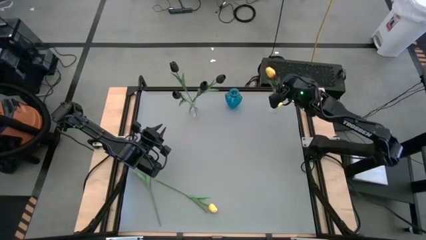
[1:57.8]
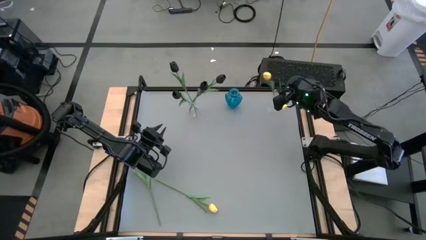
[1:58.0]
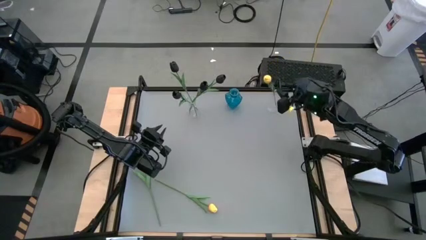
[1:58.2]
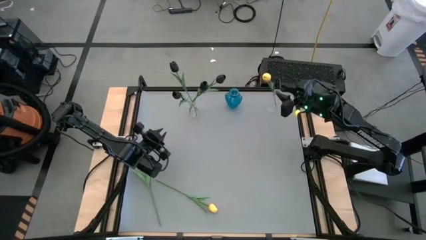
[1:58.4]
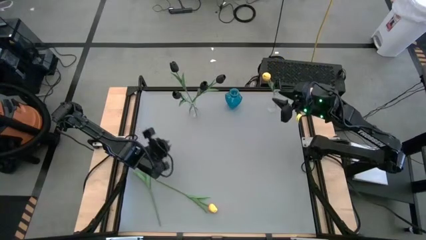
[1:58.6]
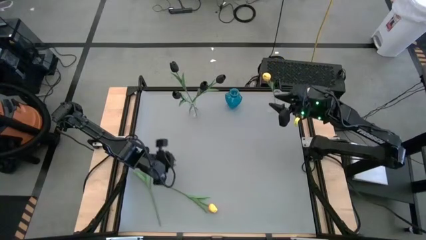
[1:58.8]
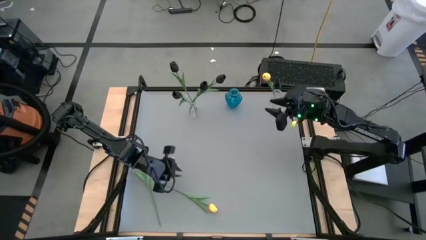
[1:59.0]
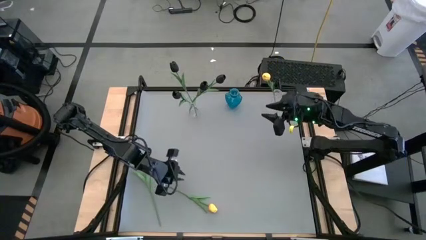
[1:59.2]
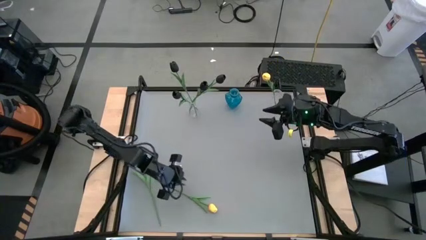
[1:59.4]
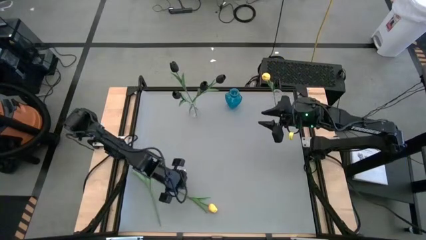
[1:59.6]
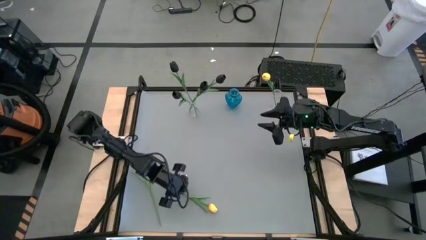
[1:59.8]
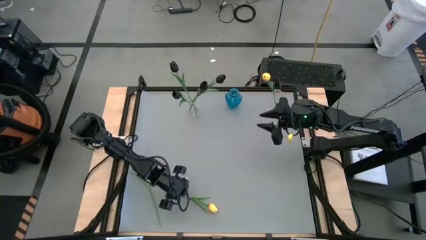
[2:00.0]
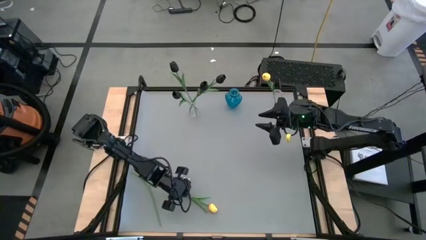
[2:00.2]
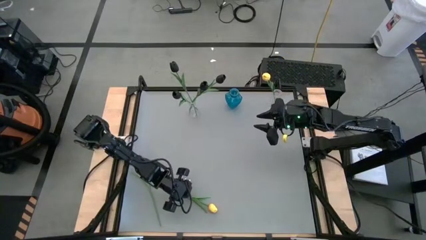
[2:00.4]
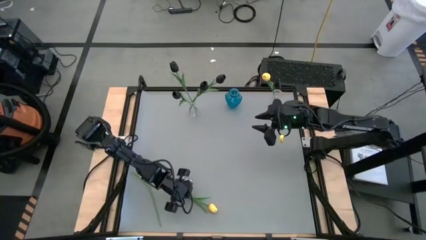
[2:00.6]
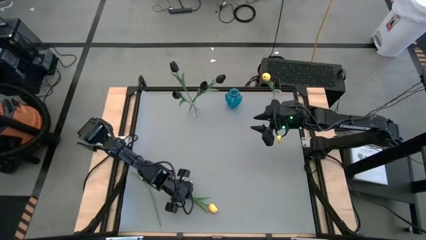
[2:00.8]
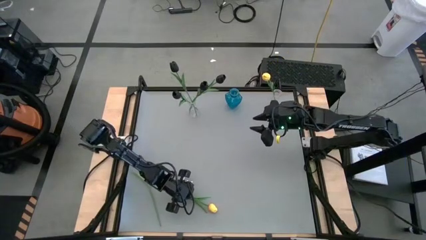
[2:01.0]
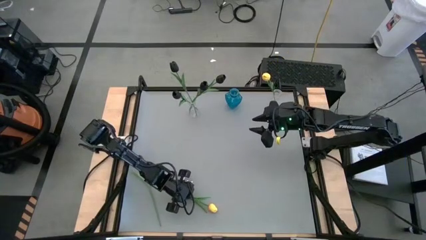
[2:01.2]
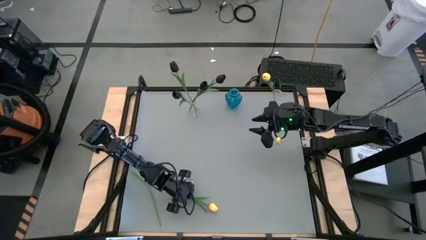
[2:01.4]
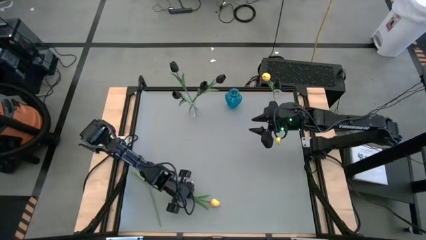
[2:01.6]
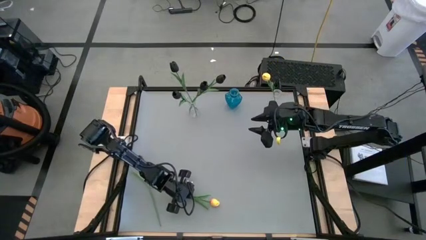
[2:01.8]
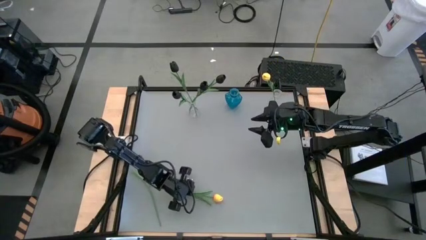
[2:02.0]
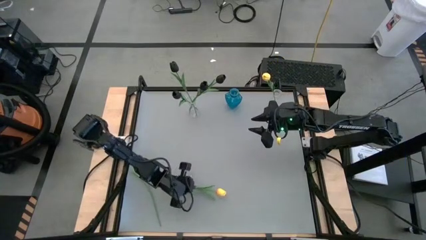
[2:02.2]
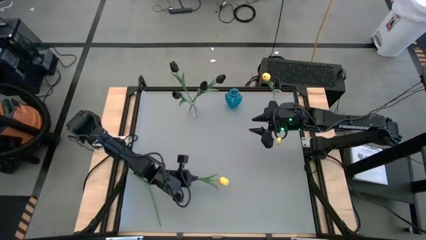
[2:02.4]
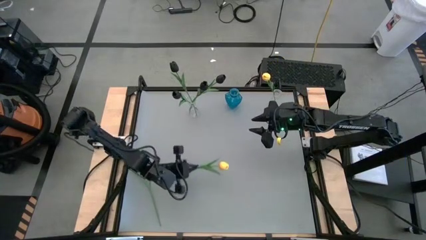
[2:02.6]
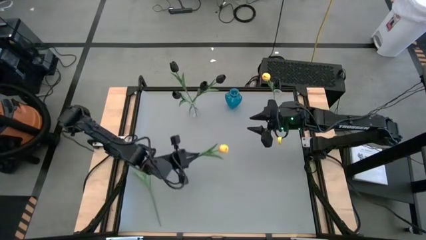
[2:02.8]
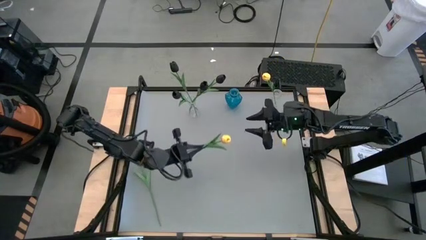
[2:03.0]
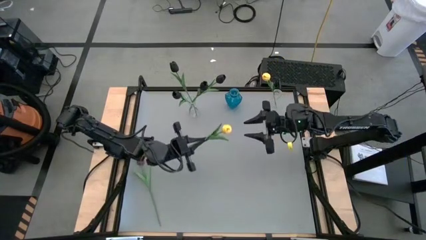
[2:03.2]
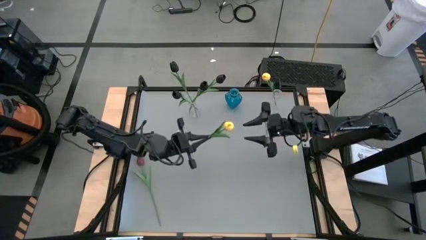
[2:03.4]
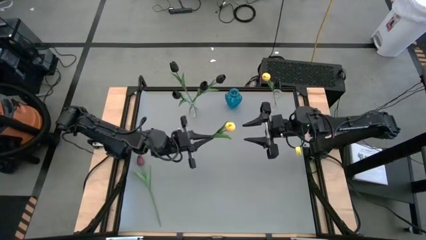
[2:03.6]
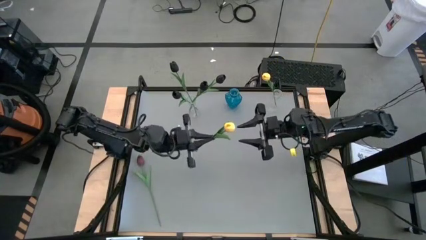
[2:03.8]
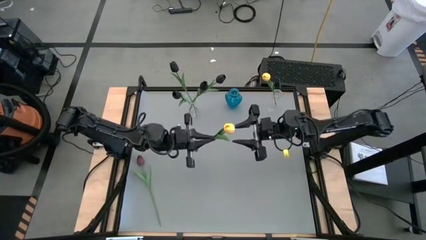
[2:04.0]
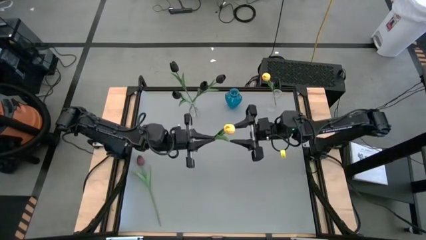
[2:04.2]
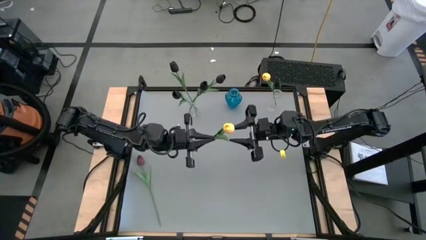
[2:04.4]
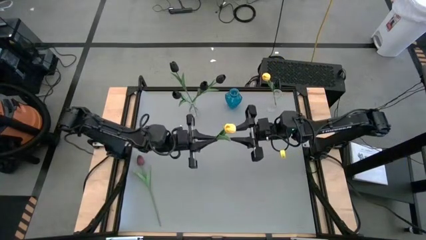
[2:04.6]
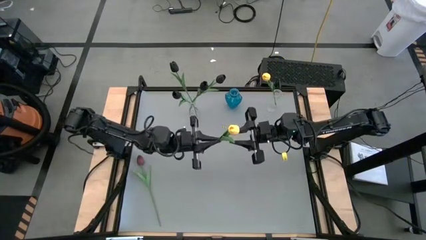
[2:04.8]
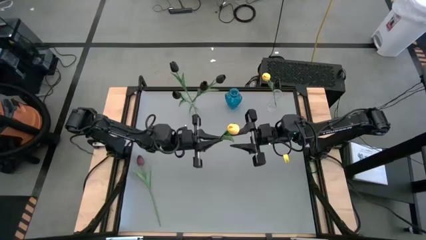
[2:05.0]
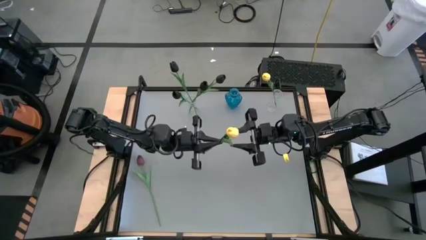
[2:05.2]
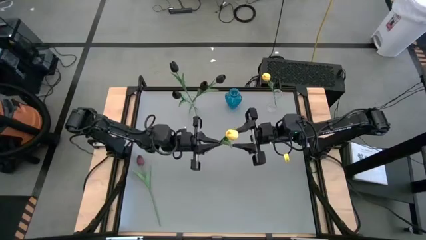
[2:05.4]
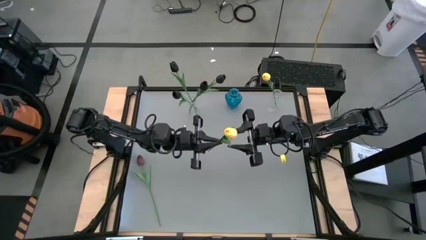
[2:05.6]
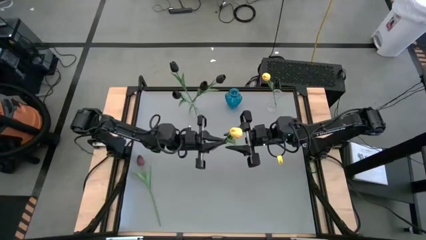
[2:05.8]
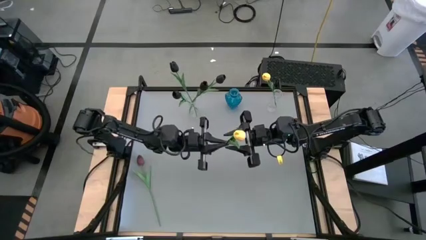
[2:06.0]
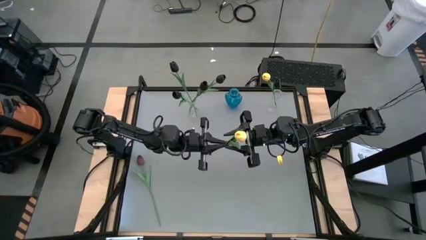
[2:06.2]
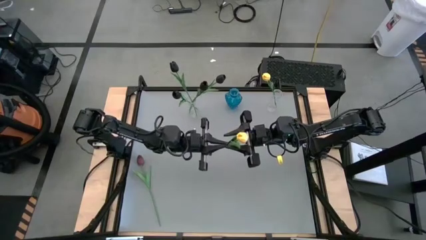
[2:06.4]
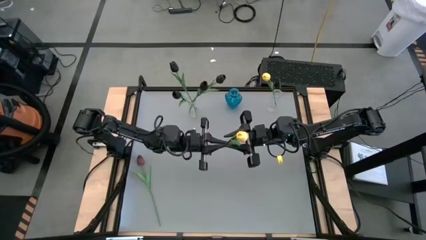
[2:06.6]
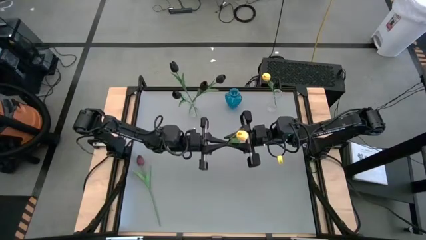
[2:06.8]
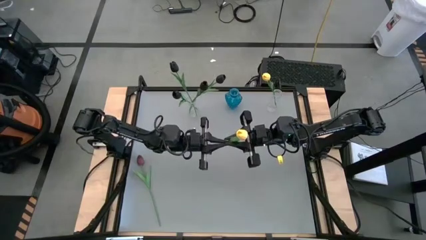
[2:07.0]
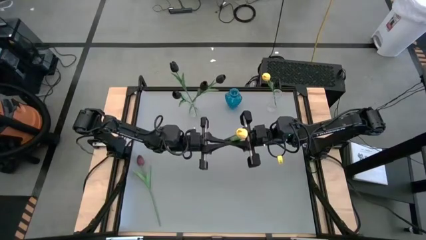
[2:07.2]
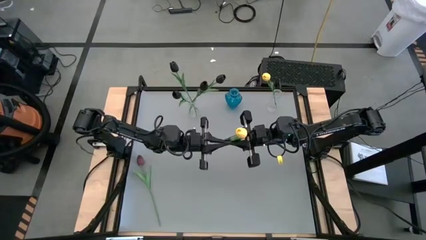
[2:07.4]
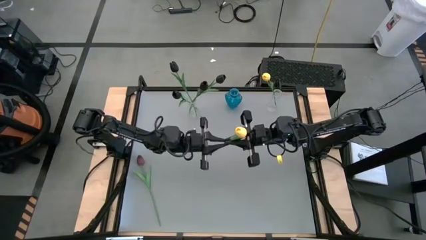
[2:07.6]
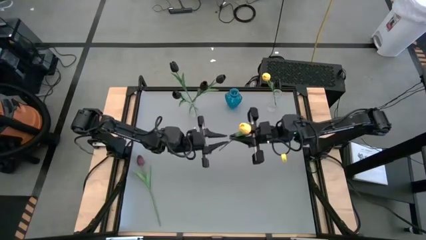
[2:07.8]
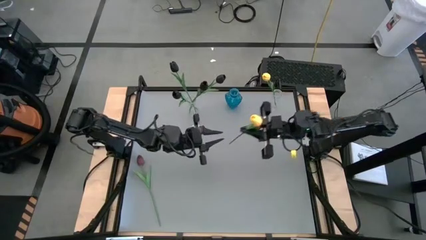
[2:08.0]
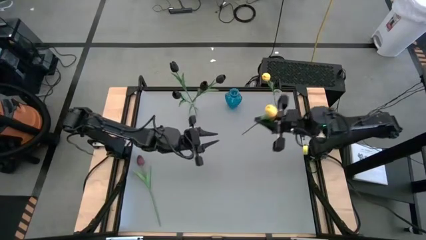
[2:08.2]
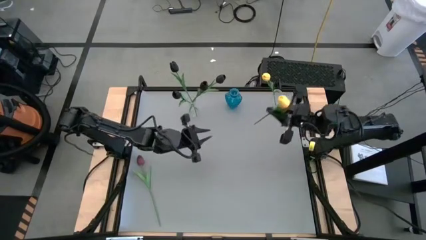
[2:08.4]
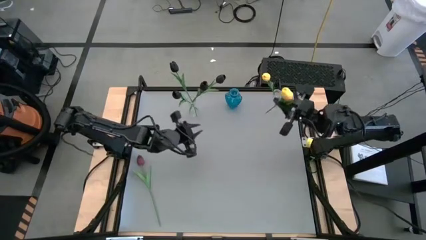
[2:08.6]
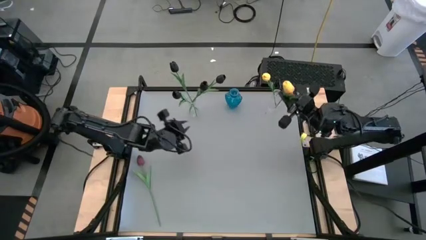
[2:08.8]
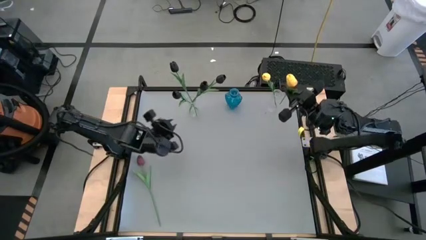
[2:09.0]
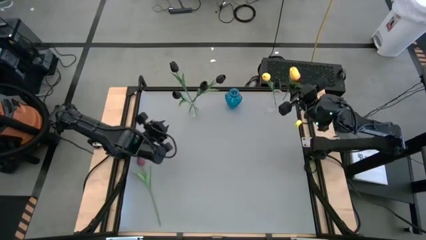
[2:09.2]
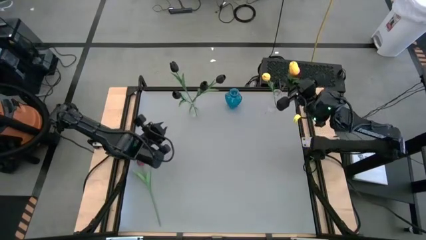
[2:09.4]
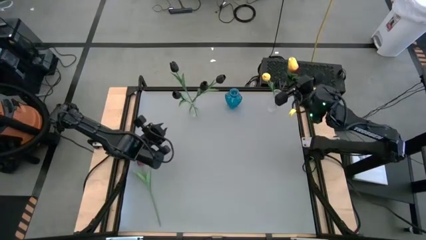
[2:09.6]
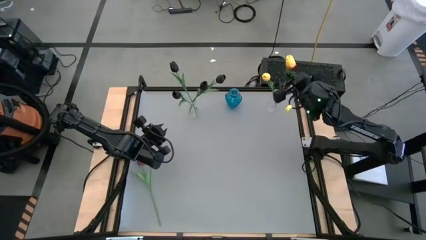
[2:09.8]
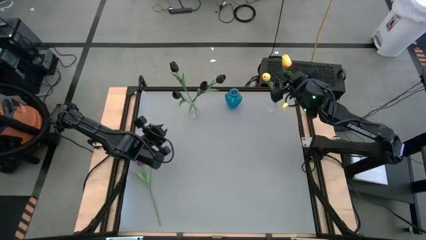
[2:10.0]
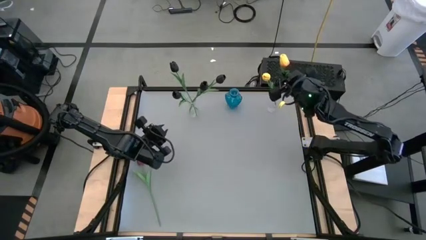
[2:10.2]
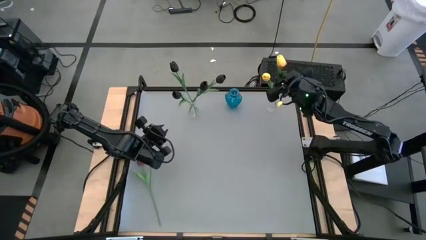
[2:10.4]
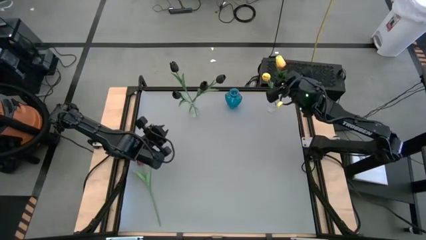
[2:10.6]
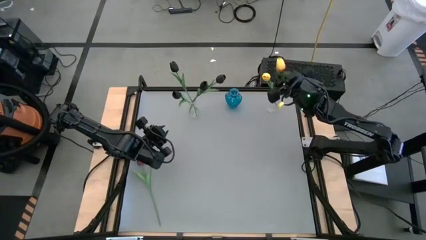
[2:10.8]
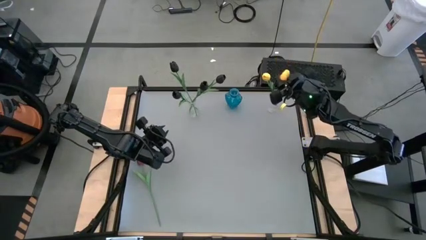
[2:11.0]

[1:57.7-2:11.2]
Task: Sort flowers into vase by color
Put the flower into the right transparent flower vase

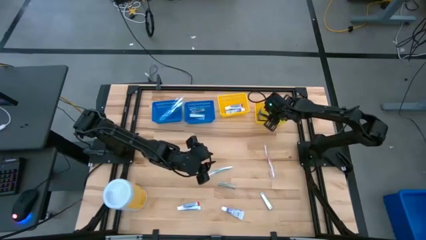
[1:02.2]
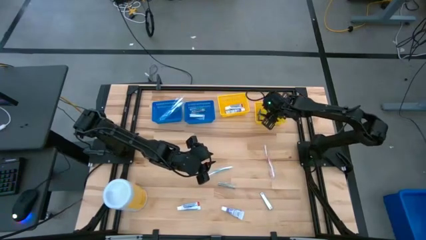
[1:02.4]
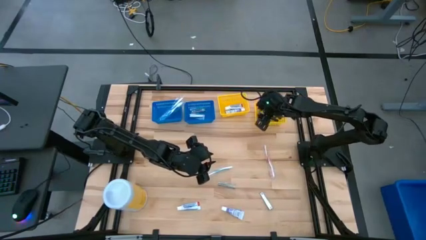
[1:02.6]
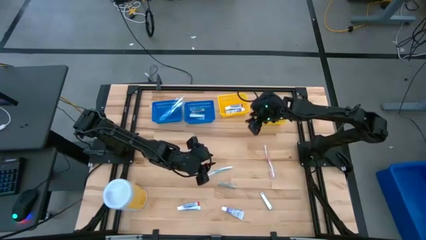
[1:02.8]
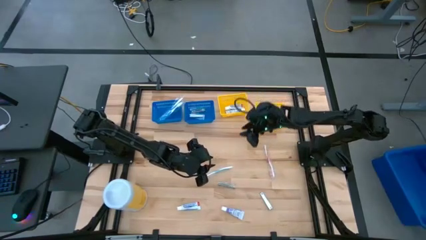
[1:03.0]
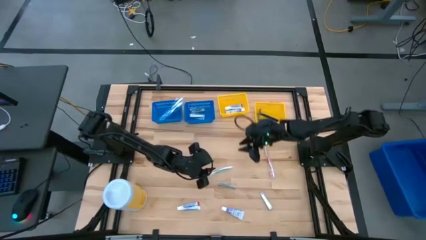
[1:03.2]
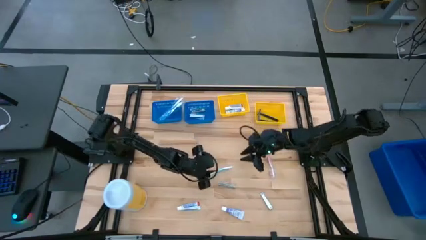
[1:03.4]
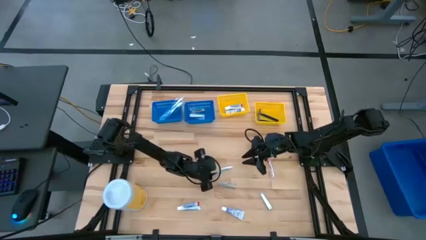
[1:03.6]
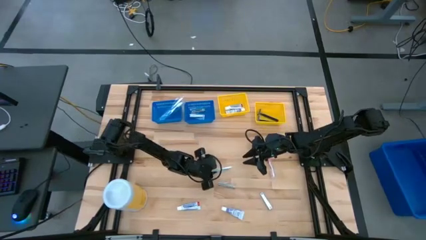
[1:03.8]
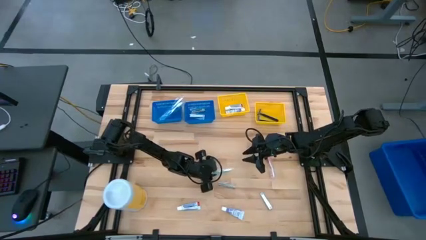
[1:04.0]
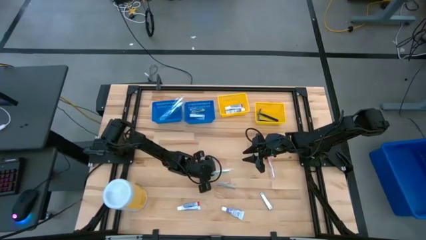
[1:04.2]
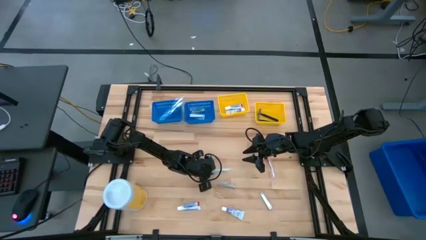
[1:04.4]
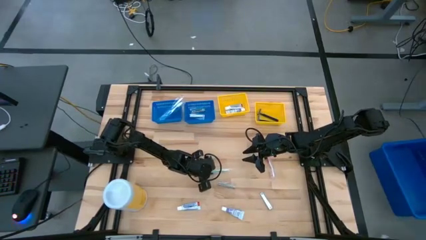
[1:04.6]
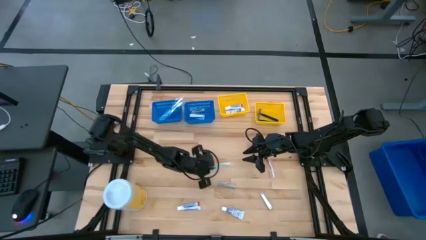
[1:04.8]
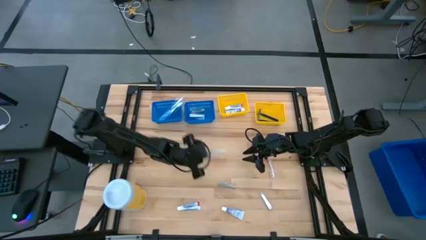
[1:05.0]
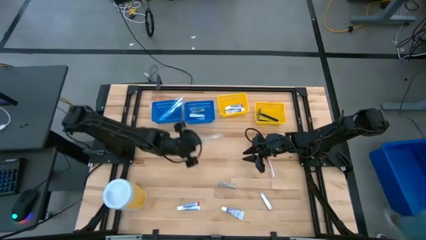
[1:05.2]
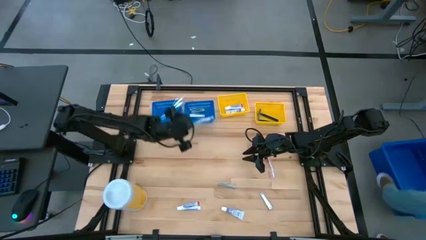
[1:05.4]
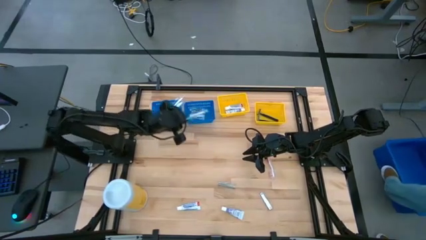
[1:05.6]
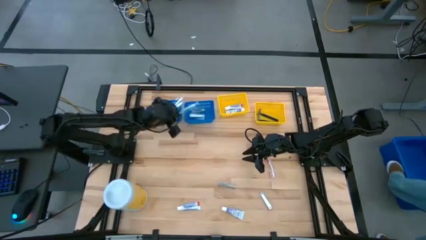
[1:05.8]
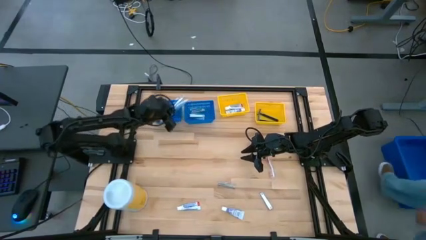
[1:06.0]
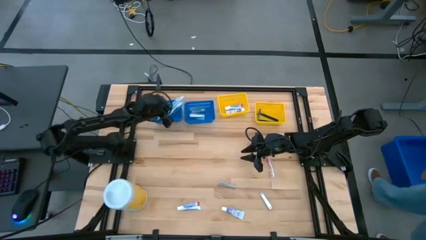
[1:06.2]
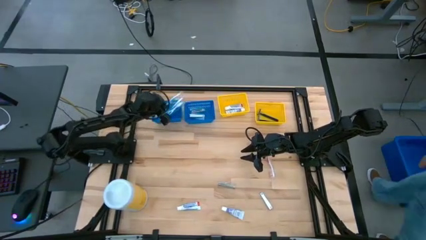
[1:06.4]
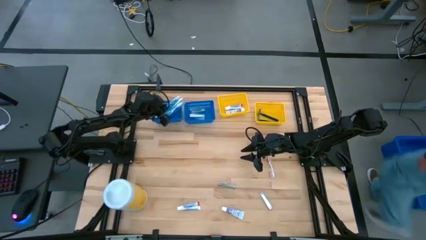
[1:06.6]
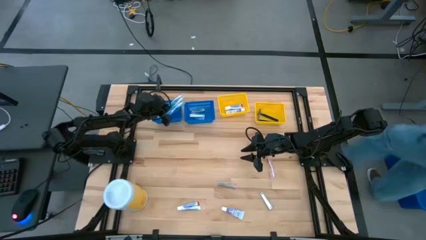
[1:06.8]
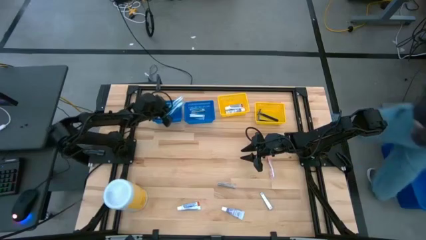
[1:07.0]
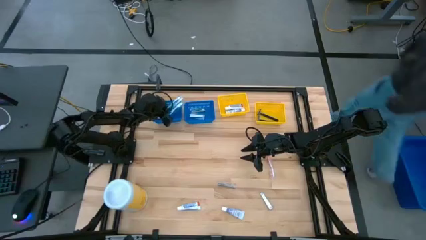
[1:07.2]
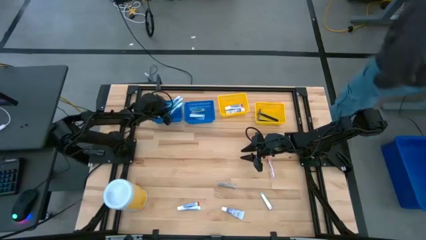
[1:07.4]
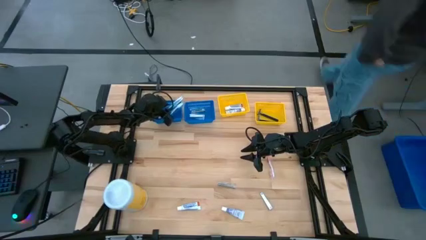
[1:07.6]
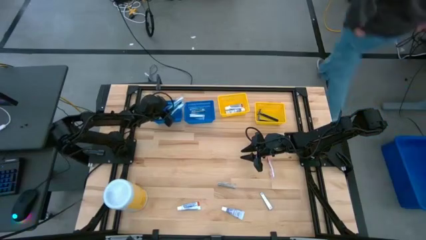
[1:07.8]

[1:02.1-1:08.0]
Task: Pick & Place Travel size toiletries
Put the green toothbrush into the left blue bin
